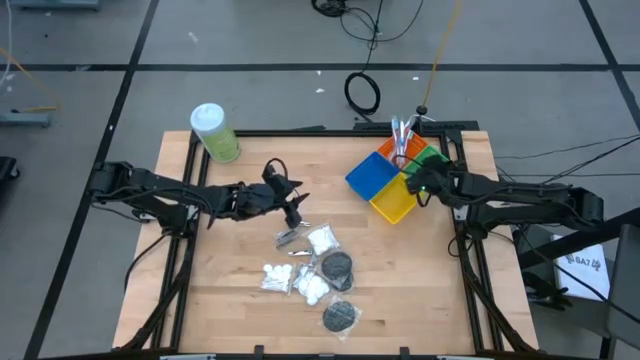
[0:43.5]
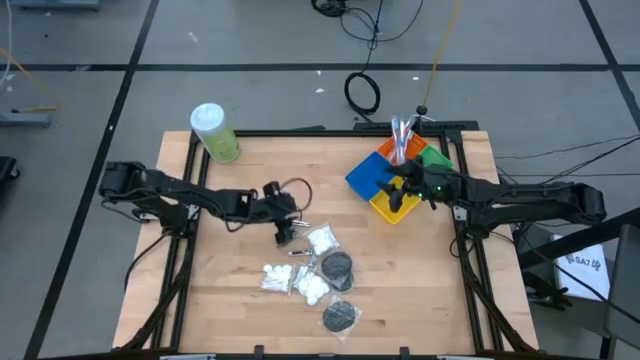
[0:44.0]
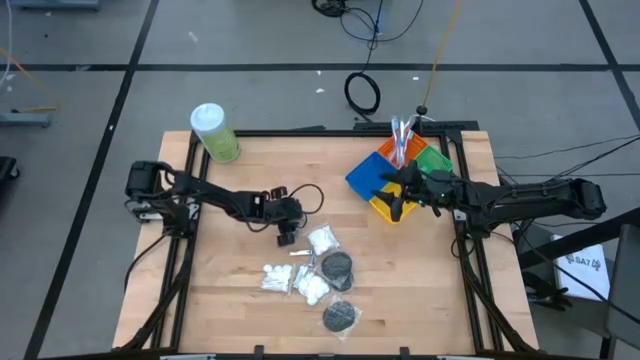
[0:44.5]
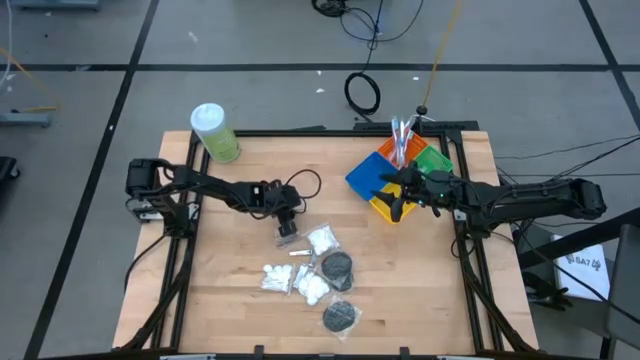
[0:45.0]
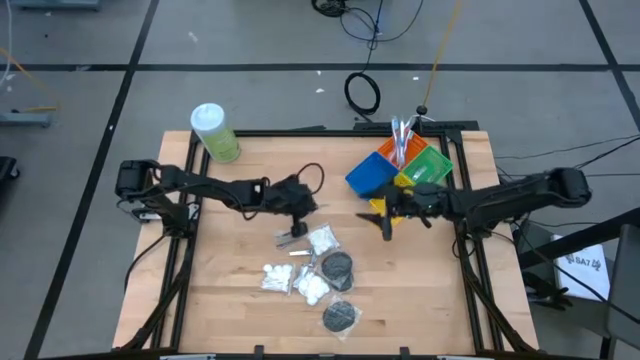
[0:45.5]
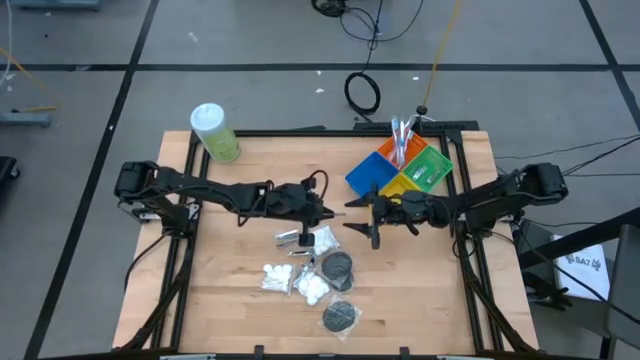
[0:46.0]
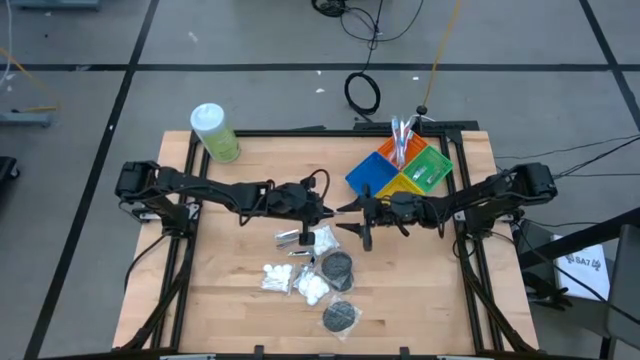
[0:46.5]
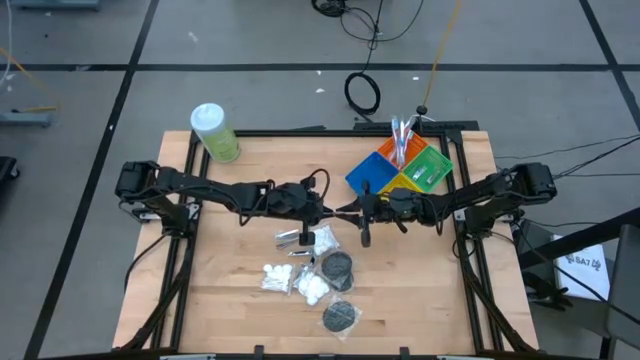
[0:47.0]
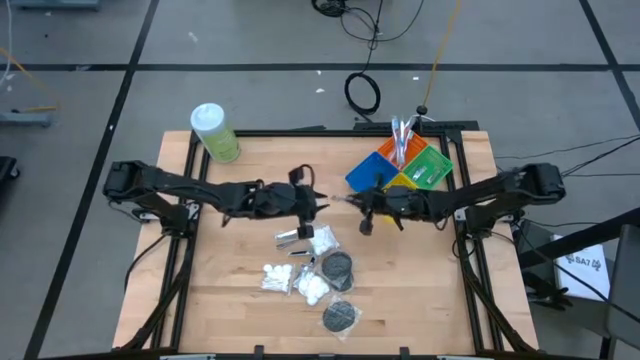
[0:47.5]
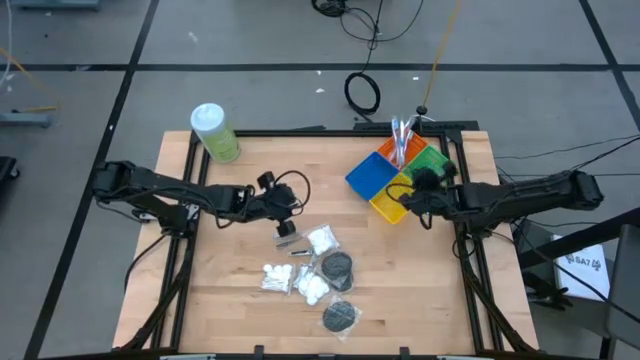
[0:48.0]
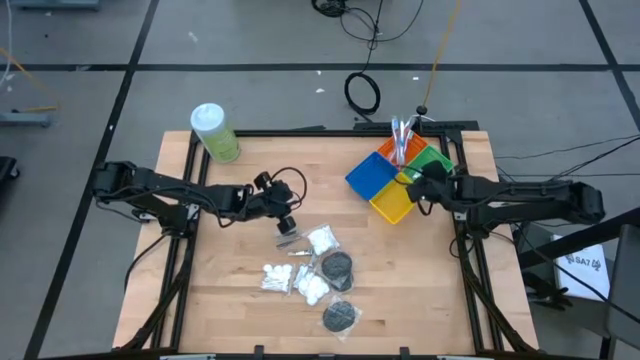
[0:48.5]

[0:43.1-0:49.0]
Task: Pick & Place Travel size toiletries
Put the nail cutter into the green bin

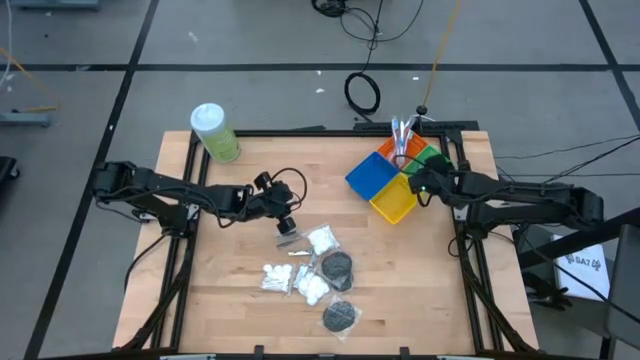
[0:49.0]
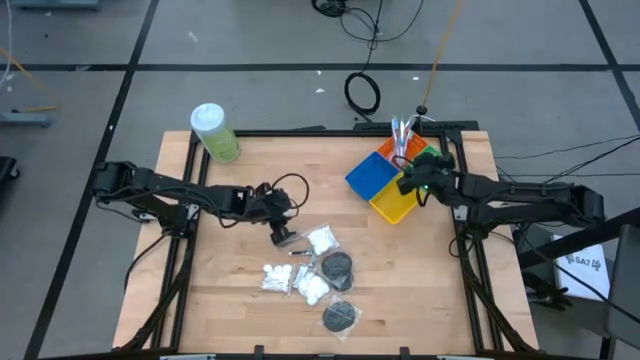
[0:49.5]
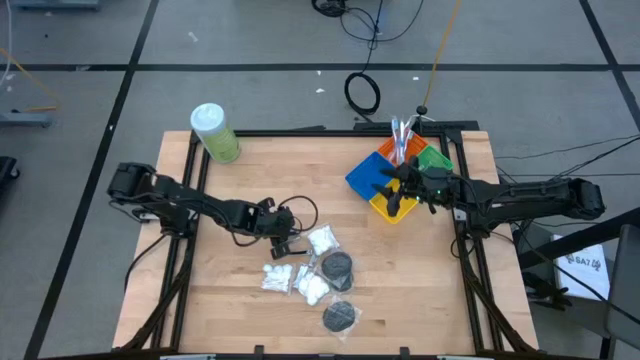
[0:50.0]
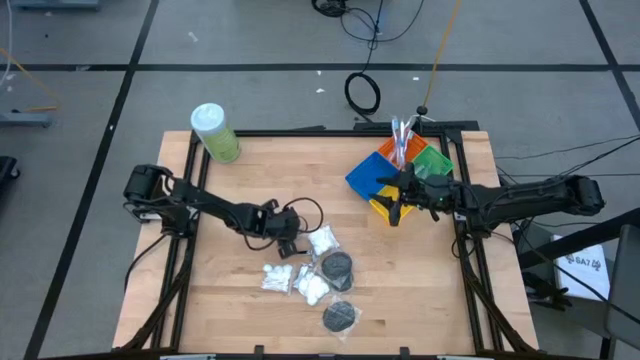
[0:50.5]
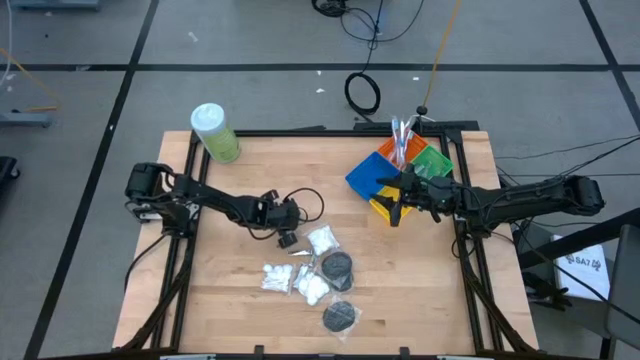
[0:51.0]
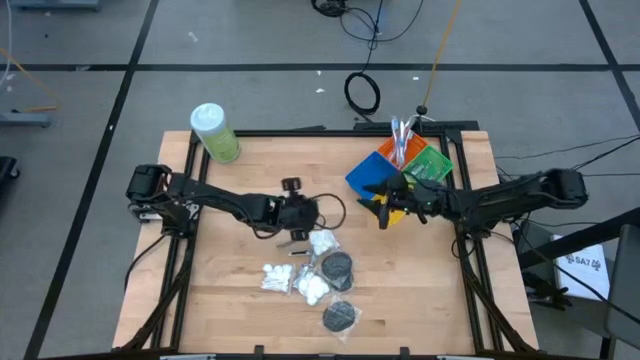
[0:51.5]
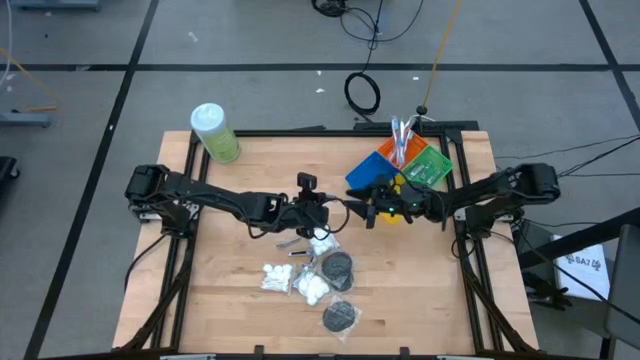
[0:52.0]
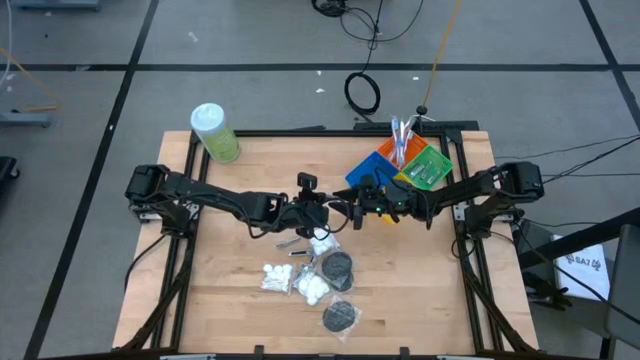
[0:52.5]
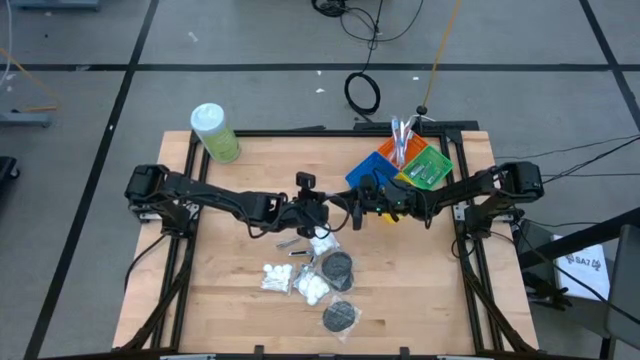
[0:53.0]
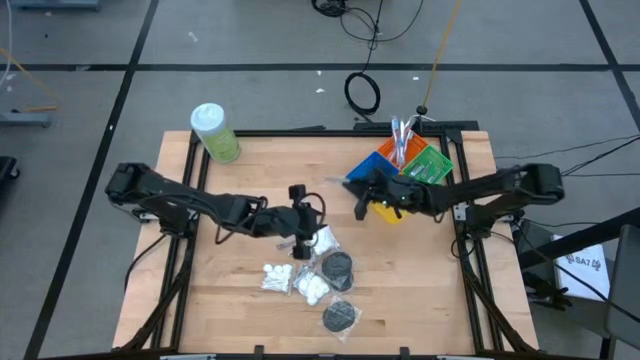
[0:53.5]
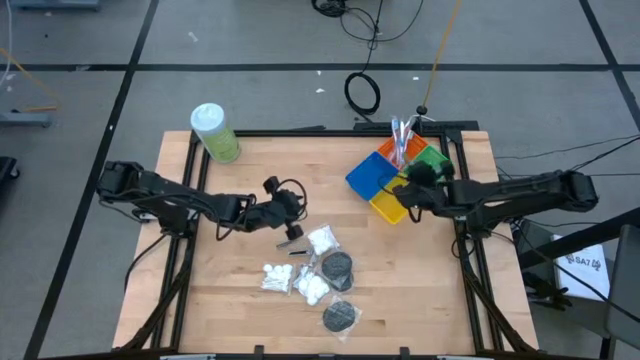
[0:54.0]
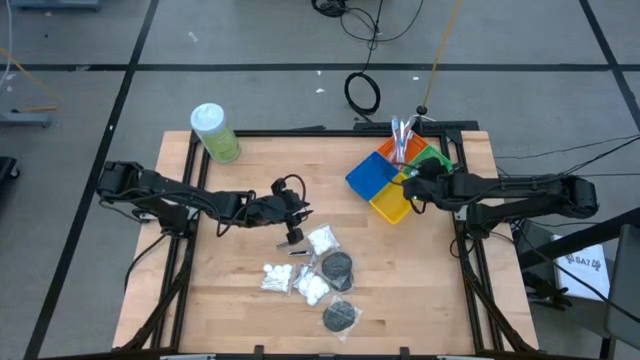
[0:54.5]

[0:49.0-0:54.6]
Put the nail cutter into the green bin

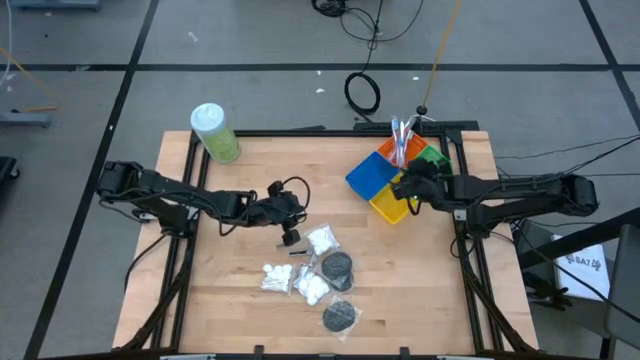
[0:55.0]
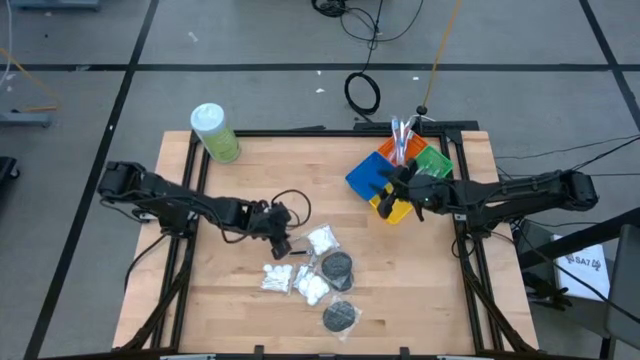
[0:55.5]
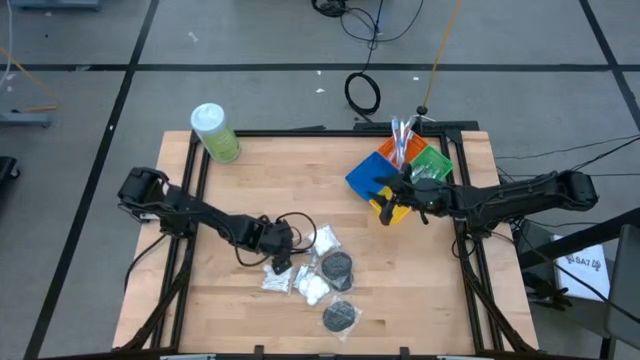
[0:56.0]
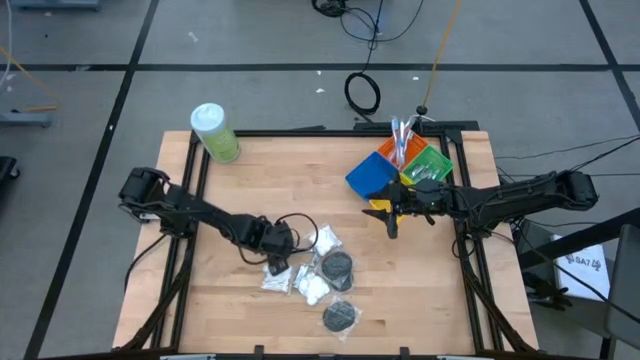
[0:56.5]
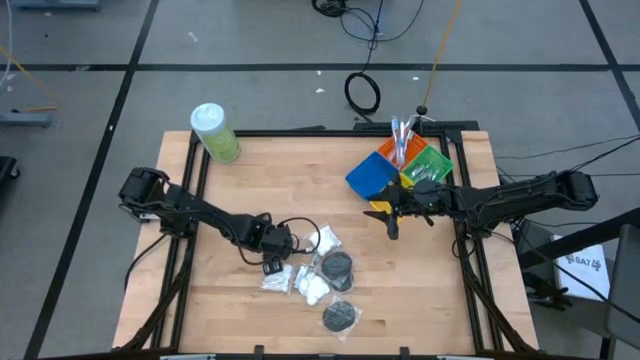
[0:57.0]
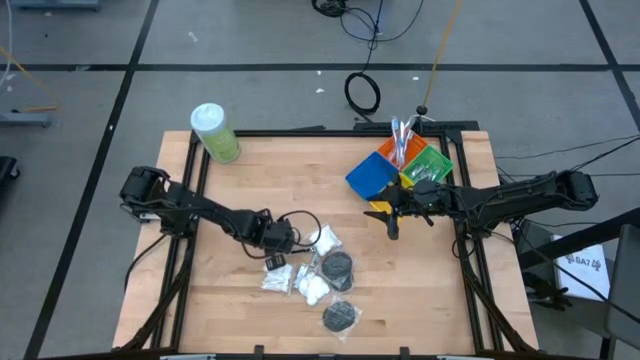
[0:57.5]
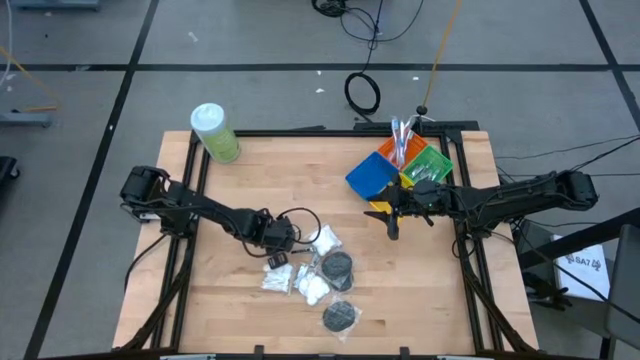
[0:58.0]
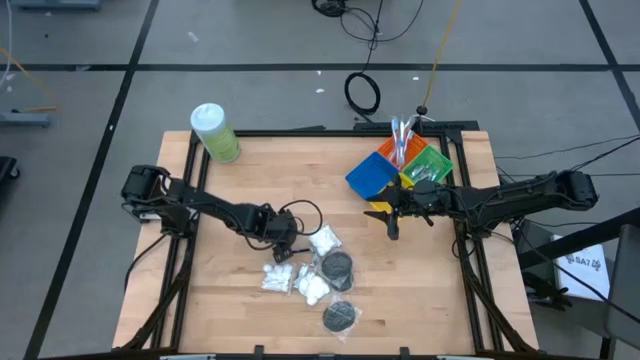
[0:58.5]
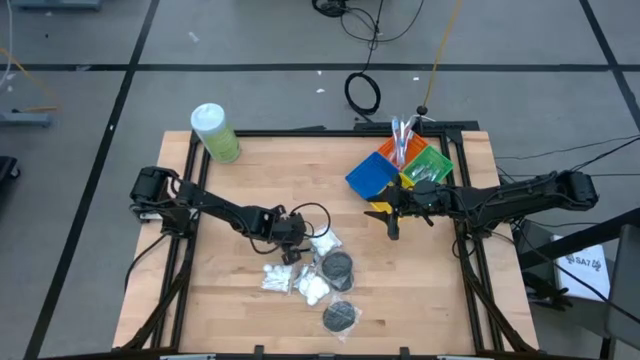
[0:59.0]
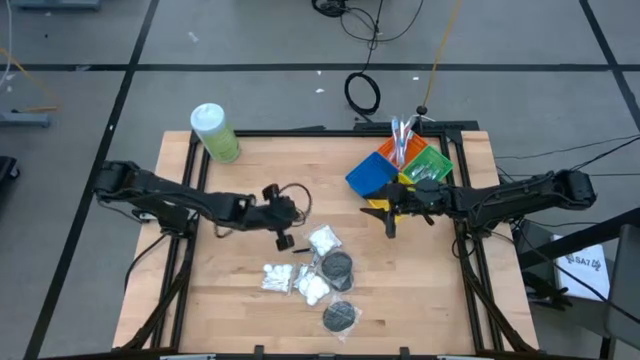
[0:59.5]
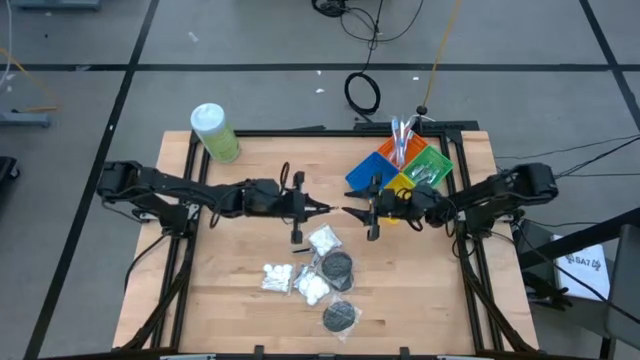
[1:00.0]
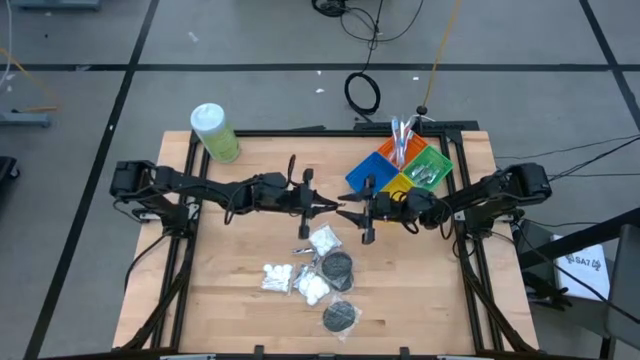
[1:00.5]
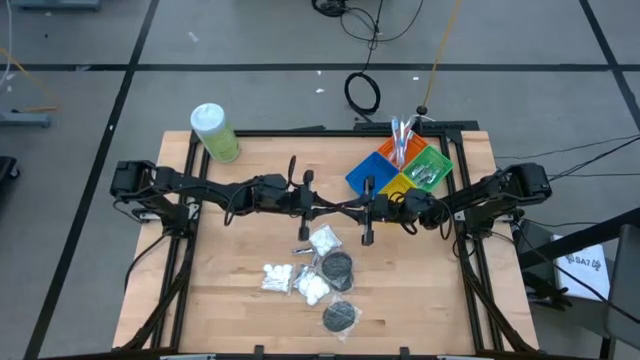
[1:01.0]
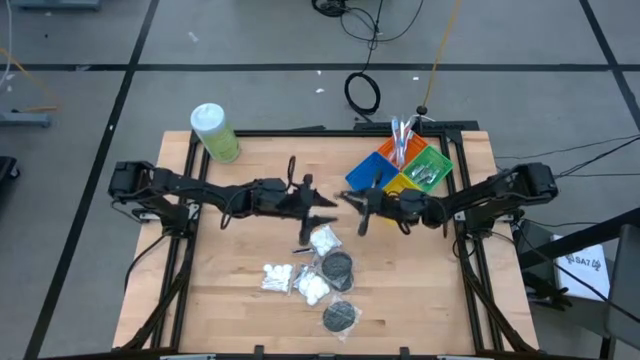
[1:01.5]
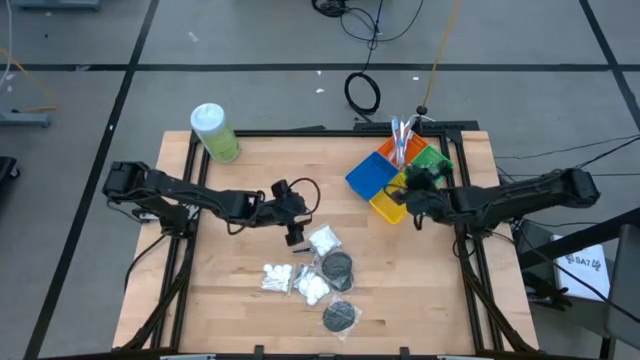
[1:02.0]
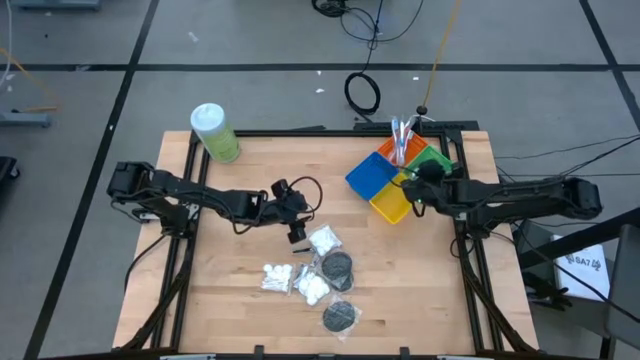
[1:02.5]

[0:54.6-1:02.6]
Put the nail cutter into the green bin

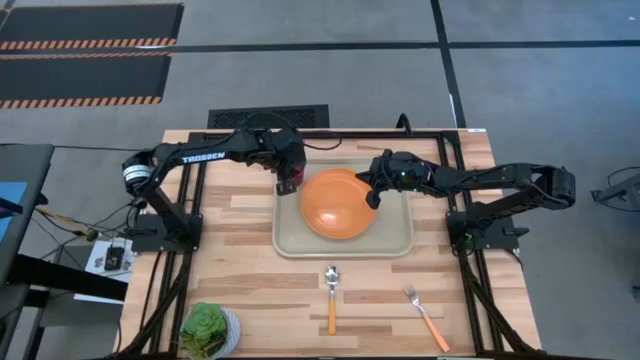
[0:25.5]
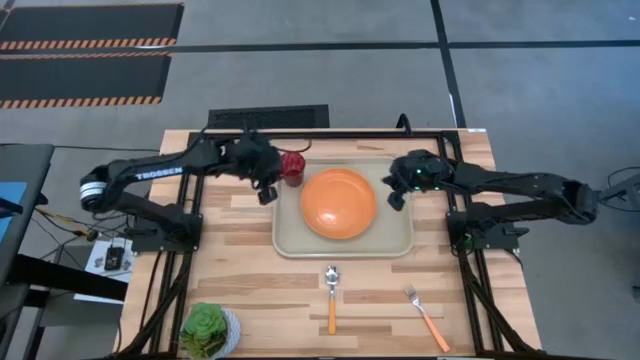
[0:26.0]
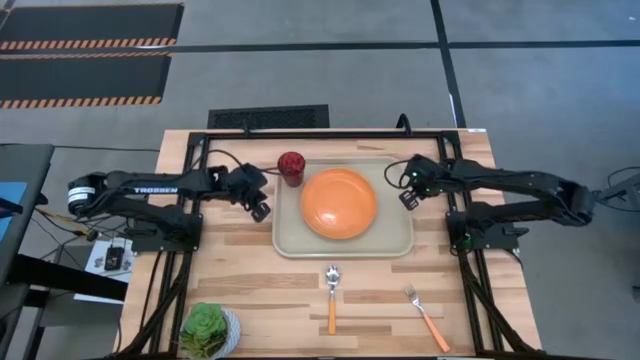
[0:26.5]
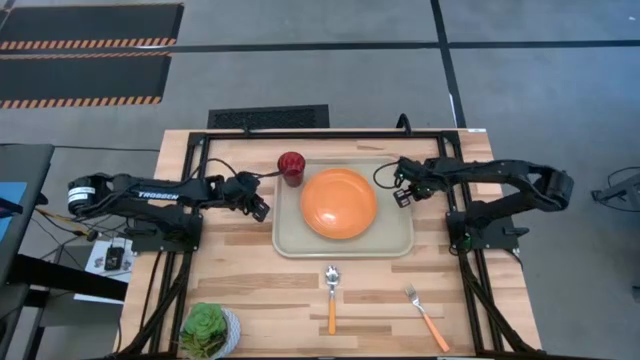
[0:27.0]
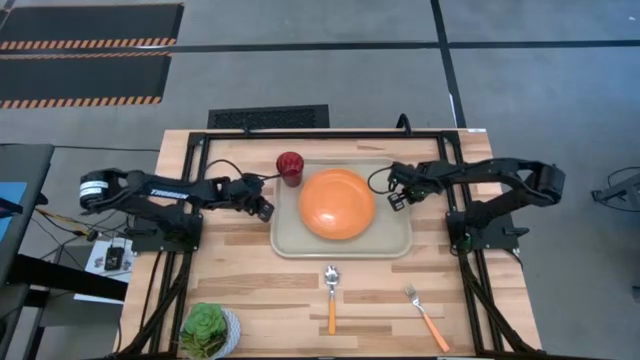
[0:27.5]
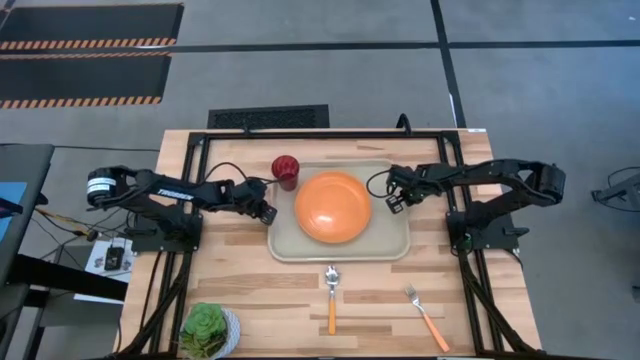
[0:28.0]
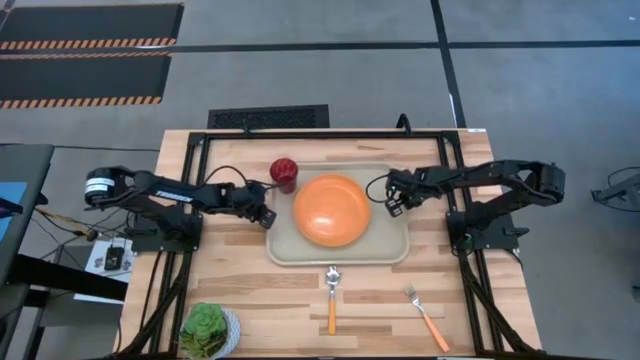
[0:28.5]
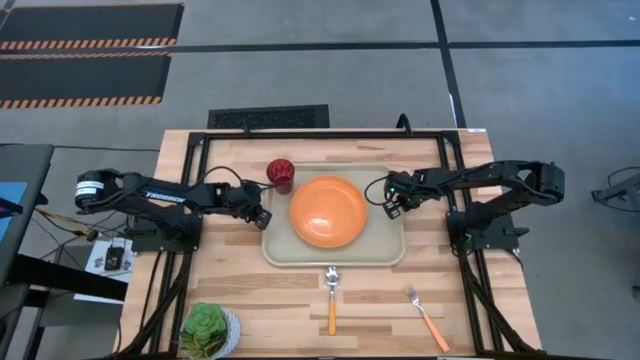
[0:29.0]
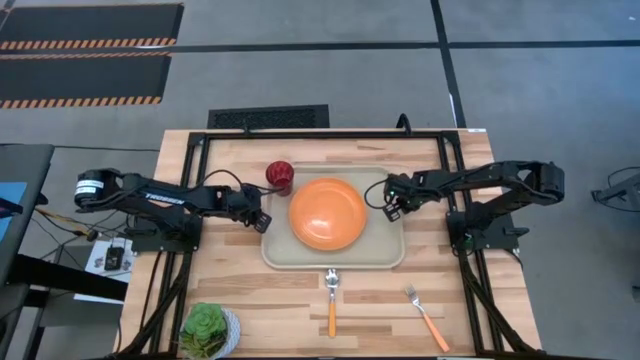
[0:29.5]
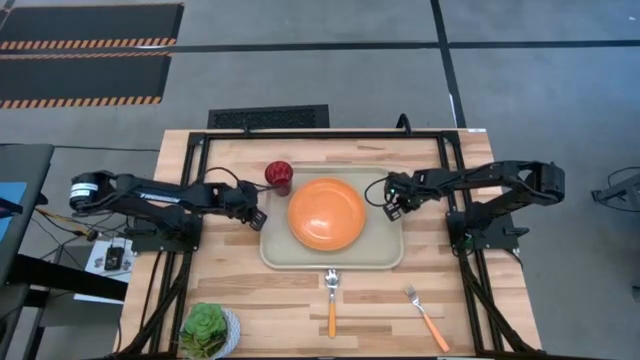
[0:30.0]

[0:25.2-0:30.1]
Task: Pick and place plate/cup/fork/spoon on tray
Adjust the gray serving tray
